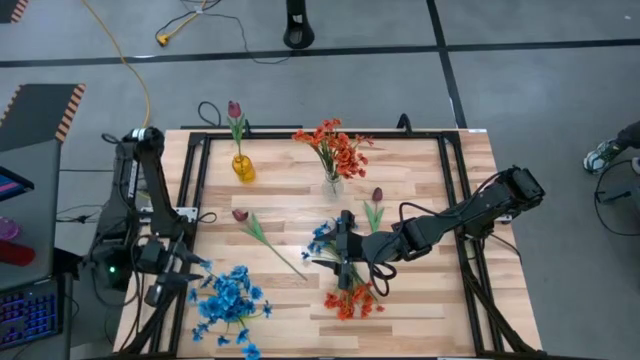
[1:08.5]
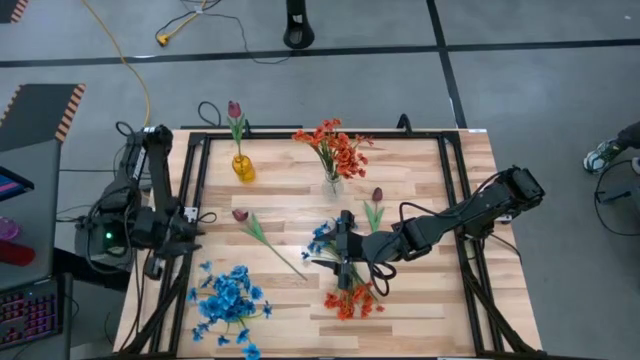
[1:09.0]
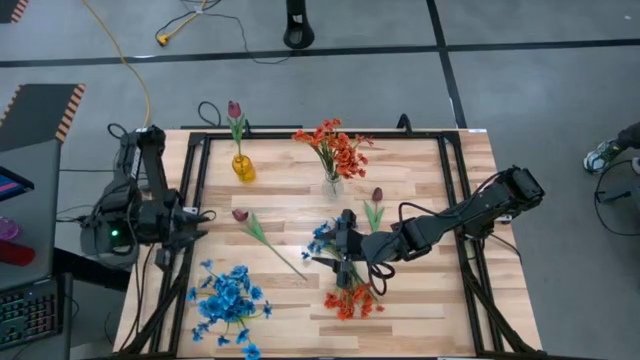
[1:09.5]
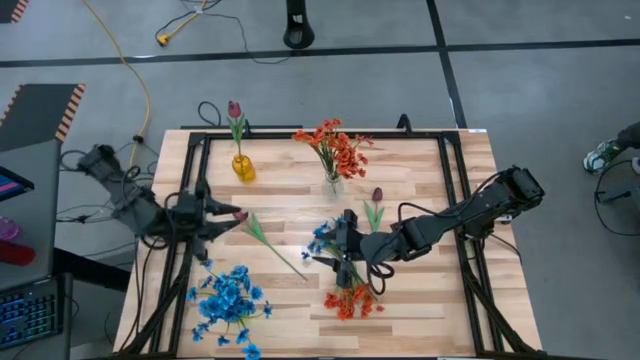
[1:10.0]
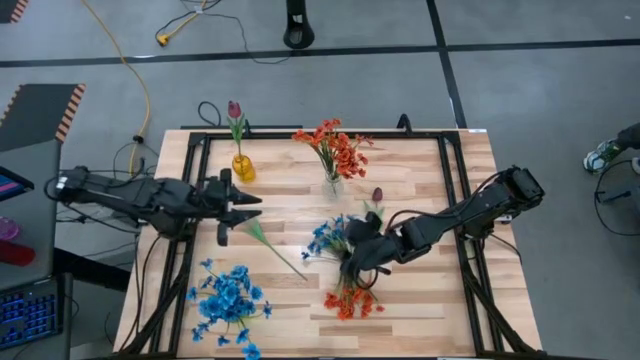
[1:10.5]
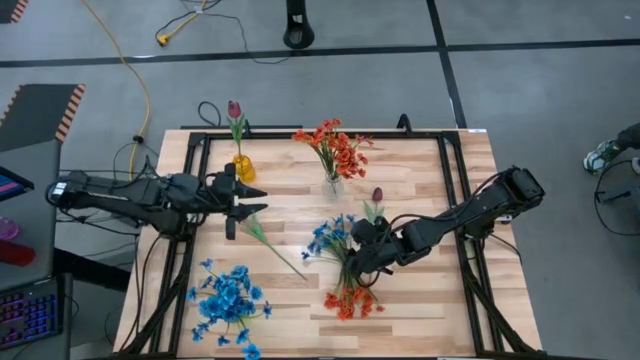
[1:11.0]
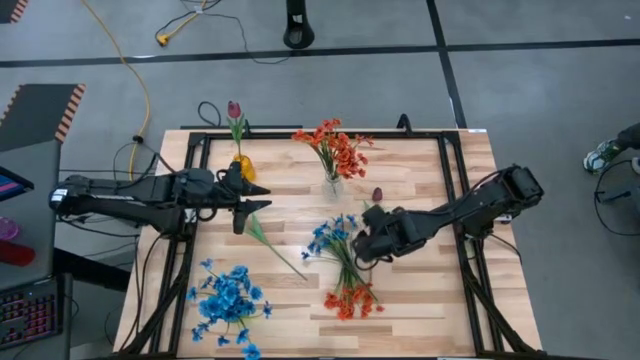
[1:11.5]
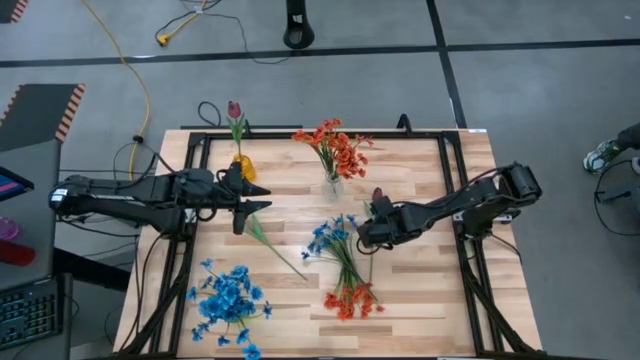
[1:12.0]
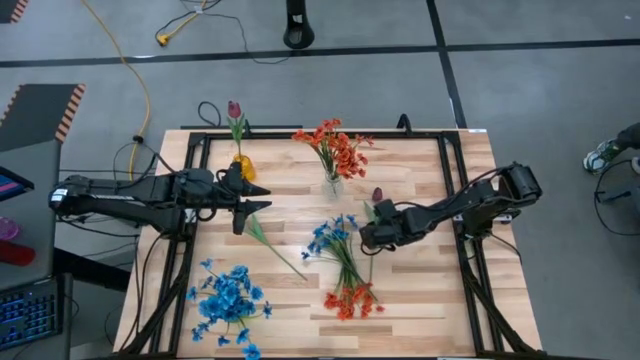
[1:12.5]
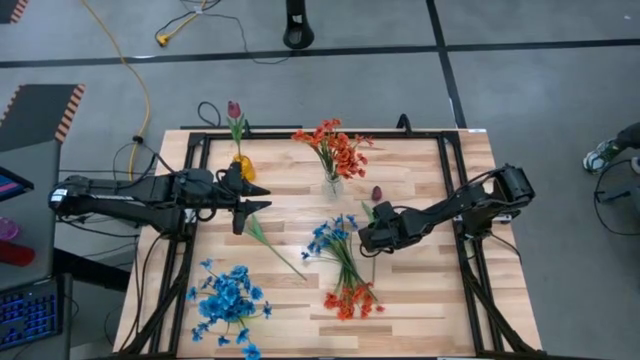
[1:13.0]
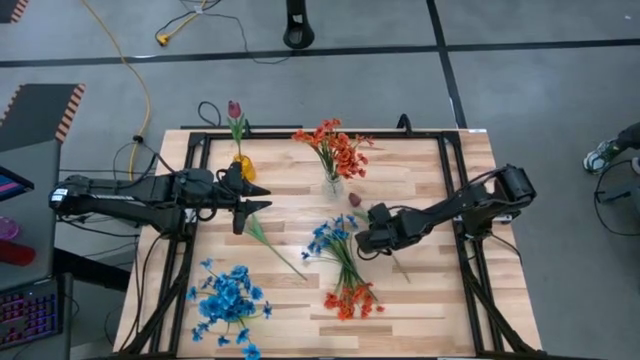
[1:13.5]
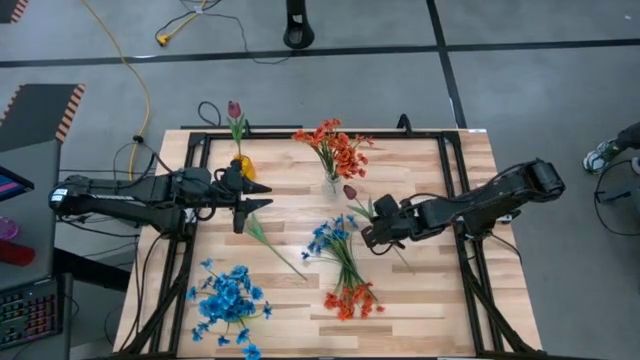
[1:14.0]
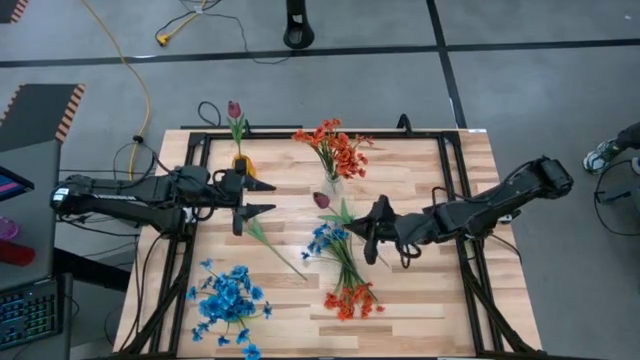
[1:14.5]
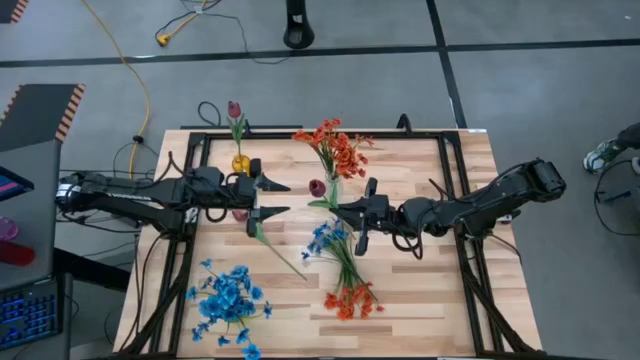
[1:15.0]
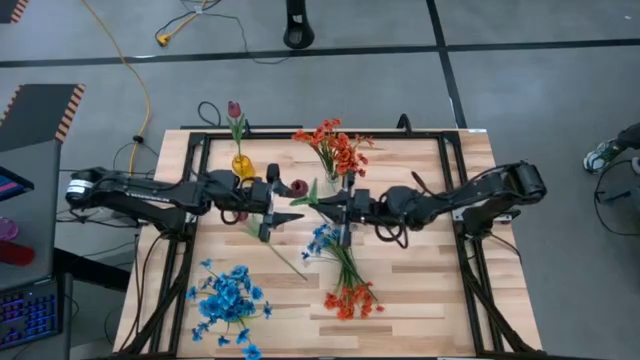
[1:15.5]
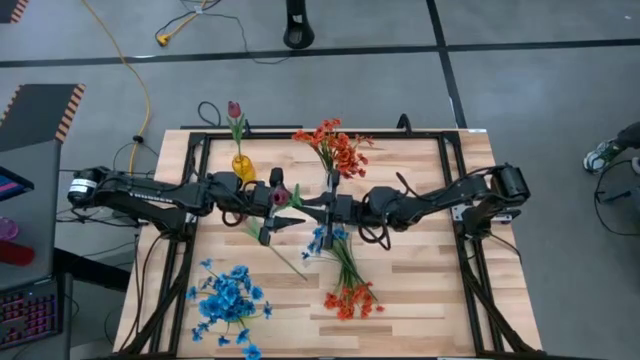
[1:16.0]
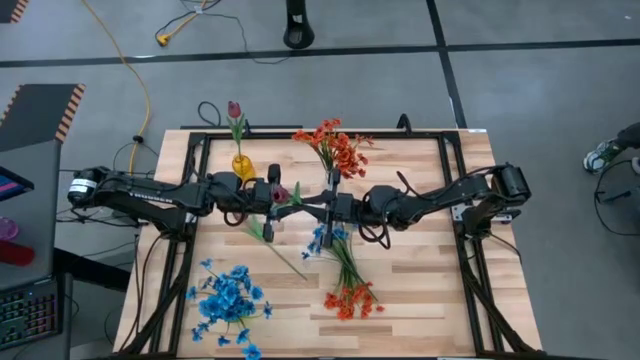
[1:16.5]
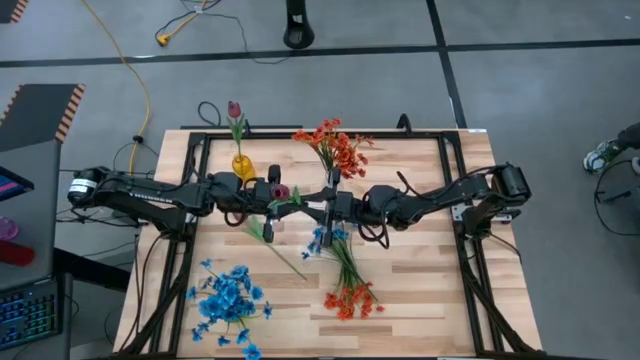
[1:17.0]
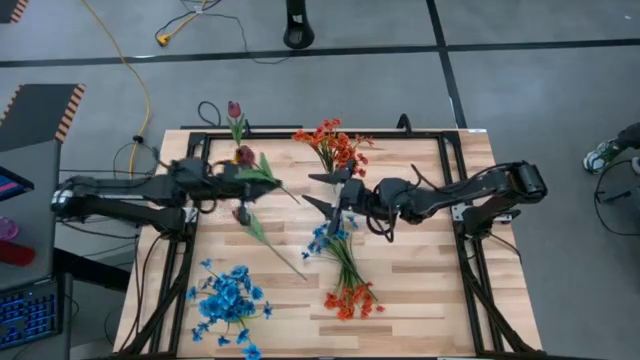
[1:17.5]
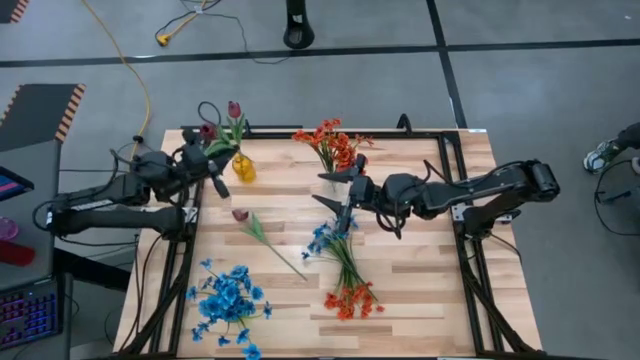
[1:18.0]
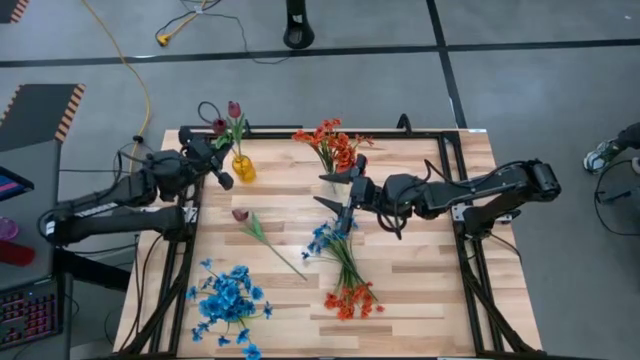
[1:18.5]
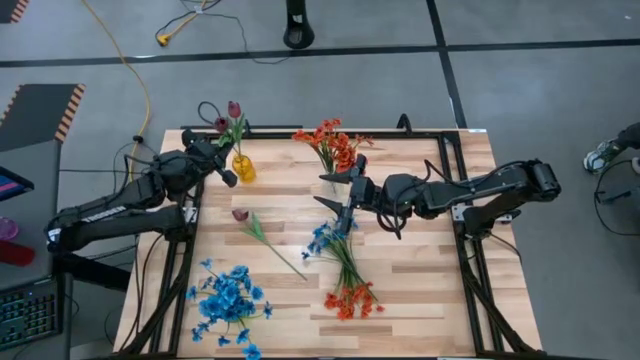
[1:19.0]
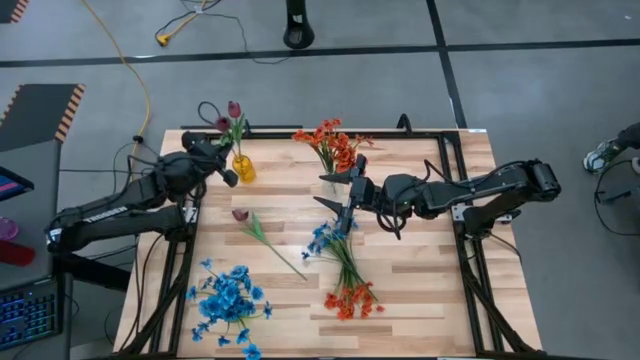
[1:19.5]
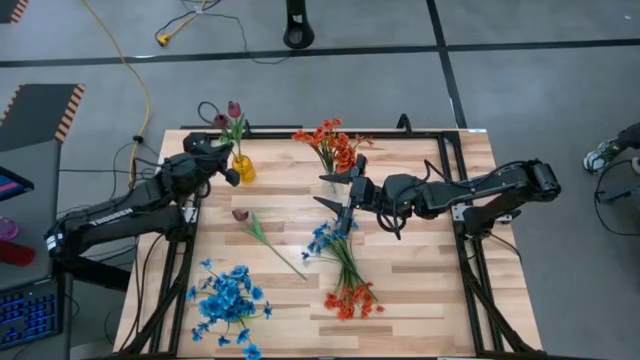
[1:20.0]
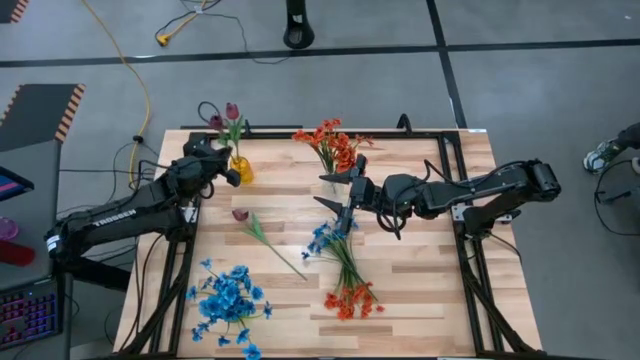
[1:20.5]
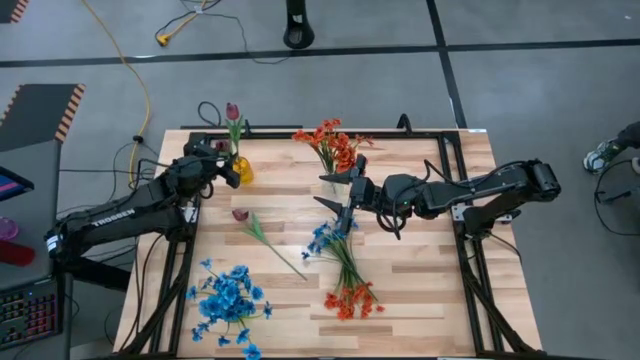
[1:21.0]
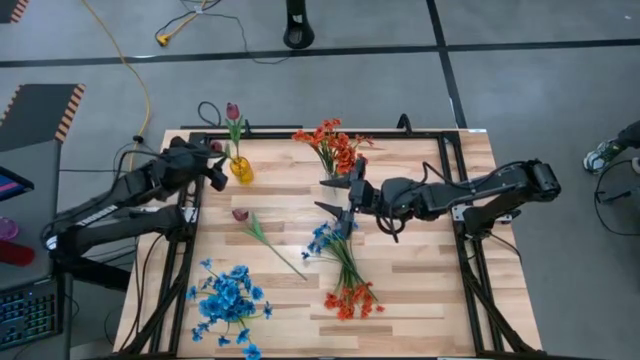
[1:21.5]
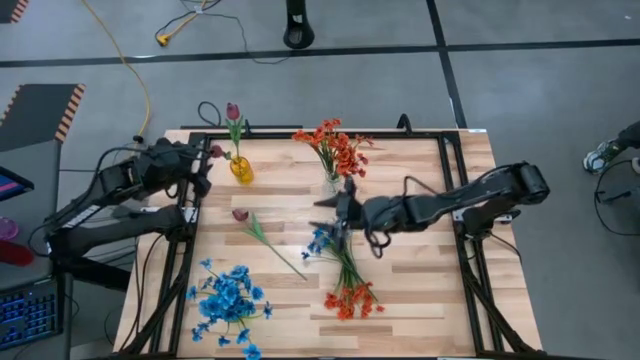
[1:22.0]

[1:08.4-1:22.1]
Task: Sort flowers into vase by color
Put the right red flower into the yellow vase

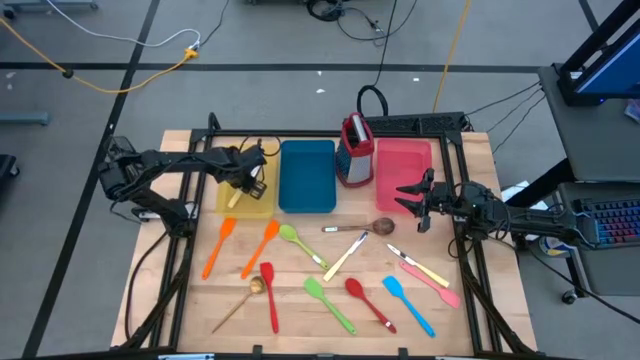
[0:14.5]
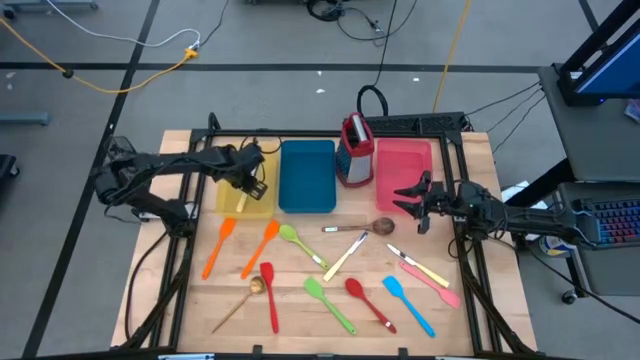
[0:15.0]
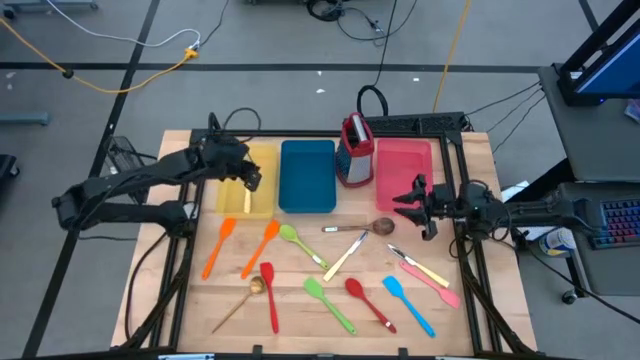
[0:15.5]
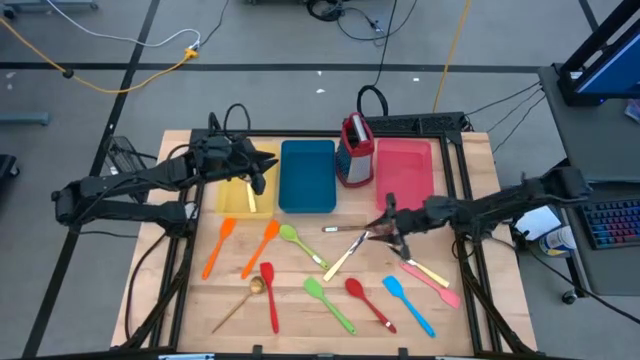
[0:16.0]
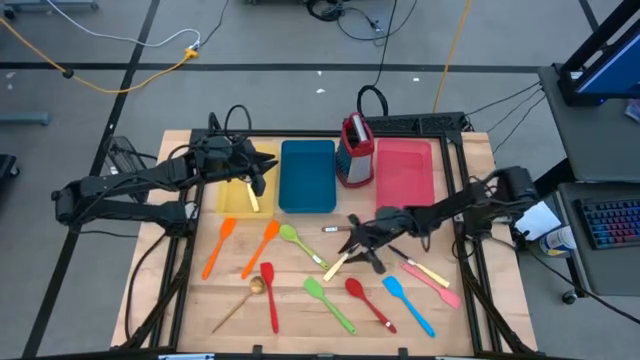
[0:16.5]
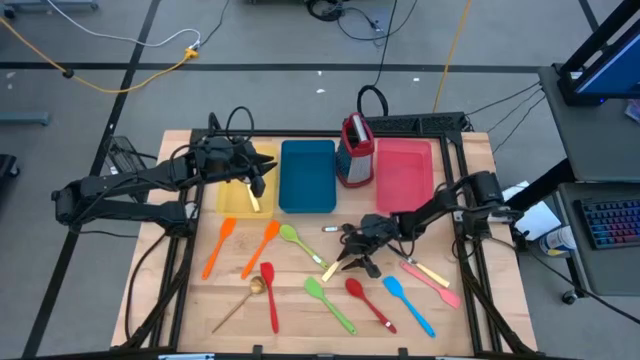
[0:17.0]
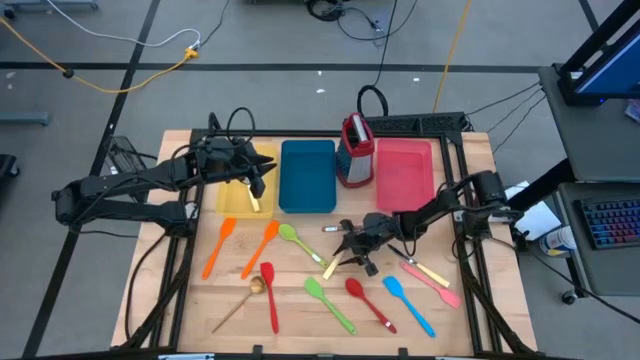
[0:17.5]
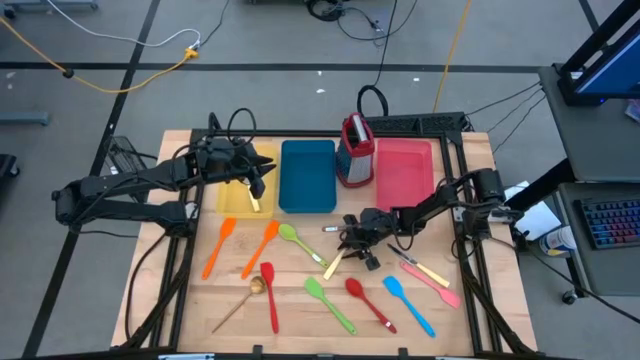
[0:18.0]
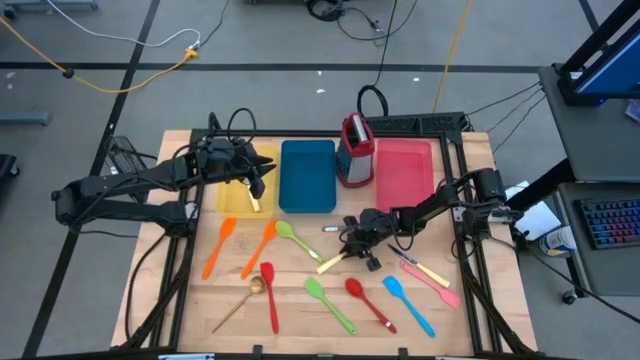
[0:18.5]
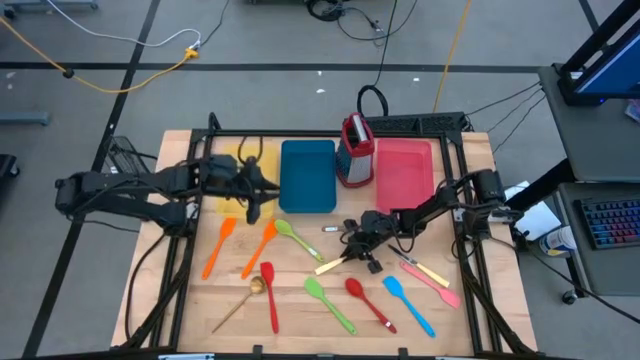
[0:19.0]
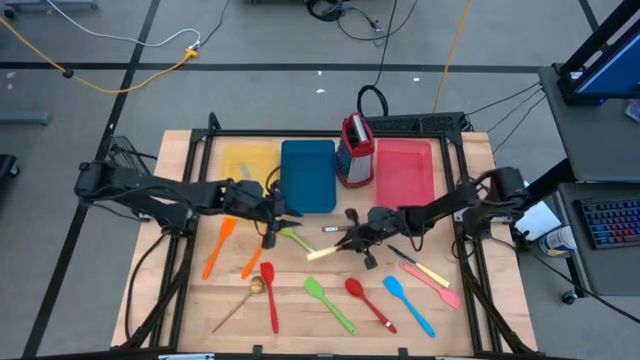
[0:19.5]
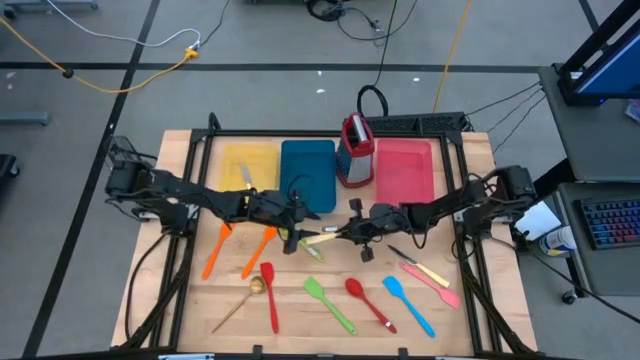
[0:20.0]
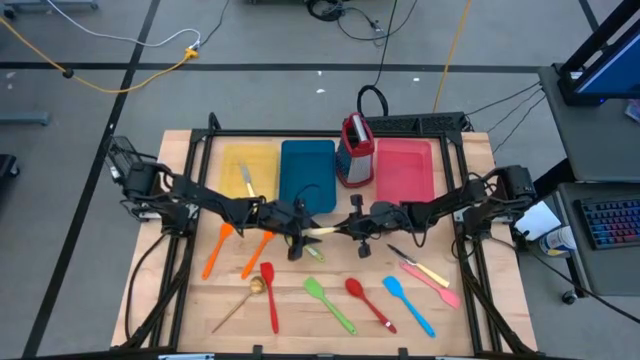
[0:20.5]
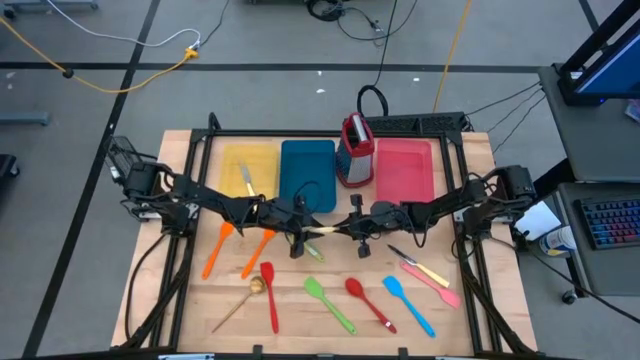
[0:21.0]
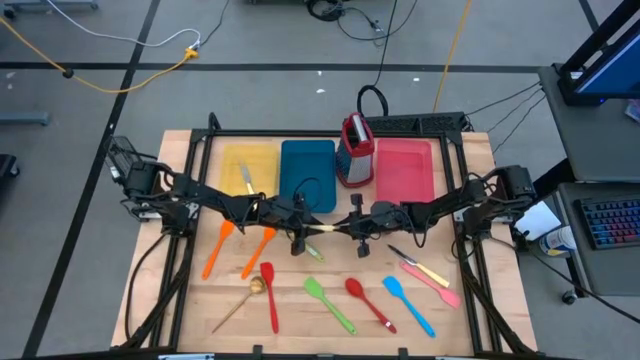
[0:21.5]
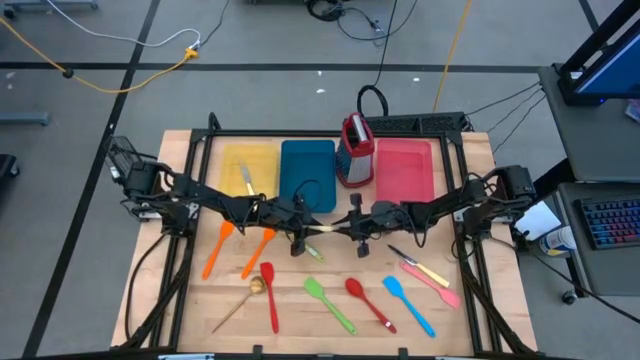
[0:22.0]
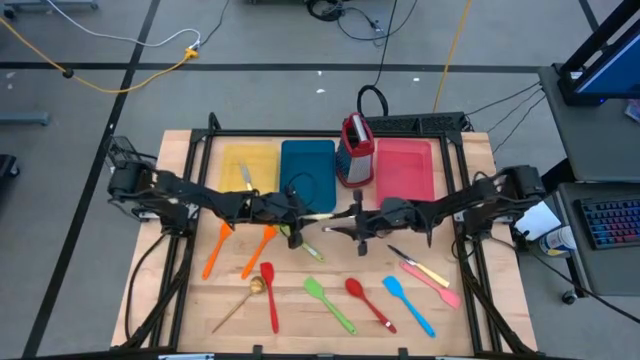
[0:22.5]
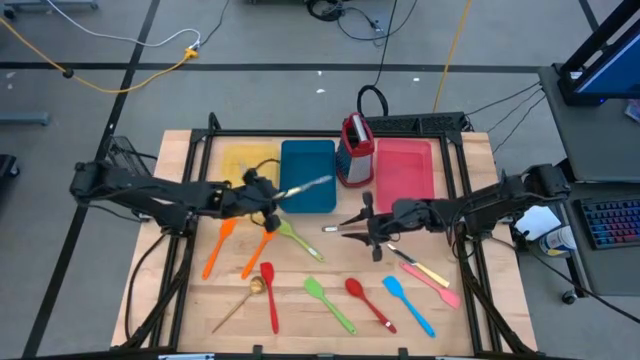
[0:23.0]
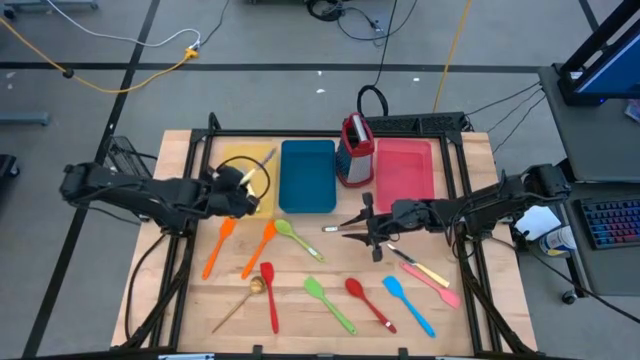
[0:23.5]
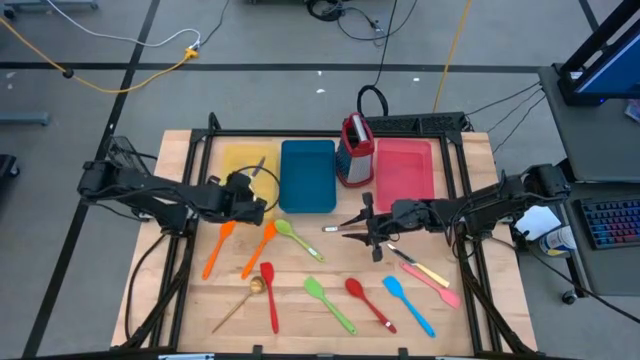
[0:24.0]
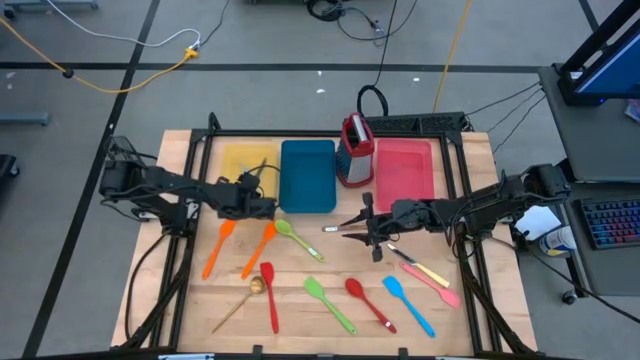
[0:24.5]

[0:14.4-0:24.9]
Task: Pick & Place Kitchen Items
Put the left yellow table knife into the yellow bin
